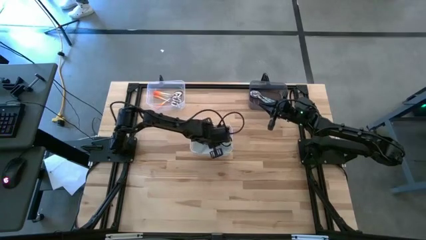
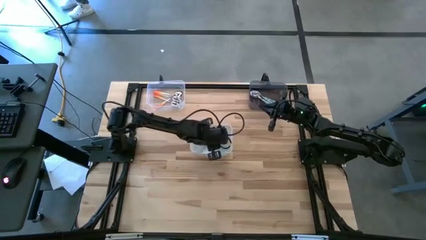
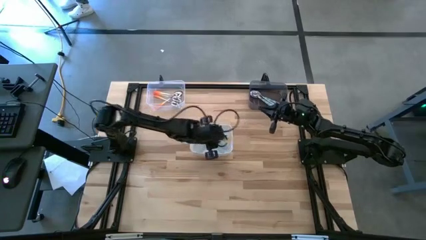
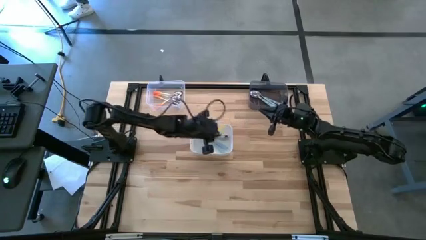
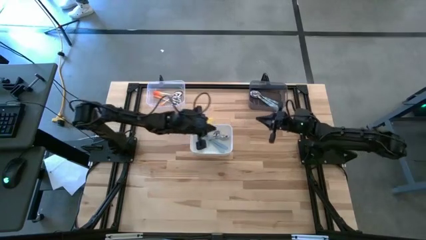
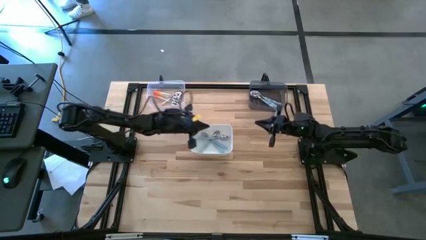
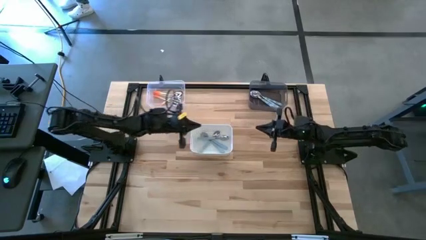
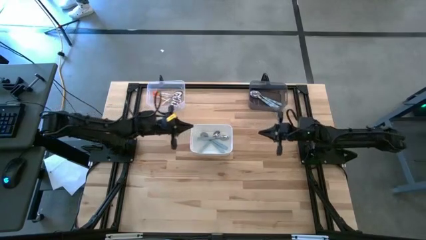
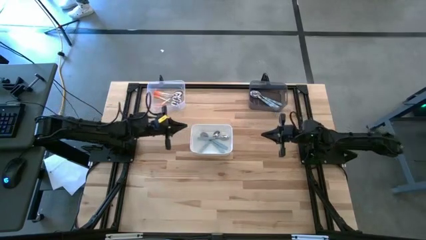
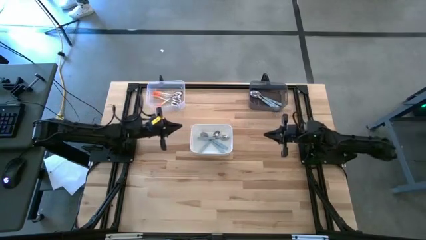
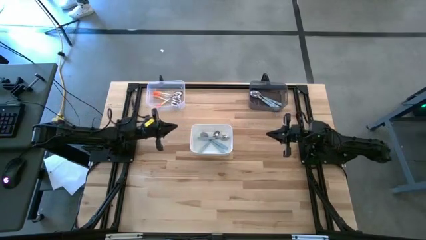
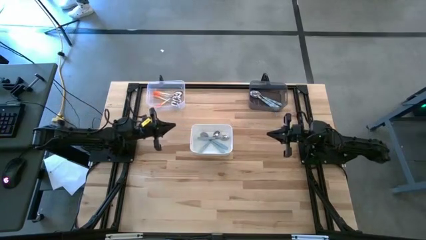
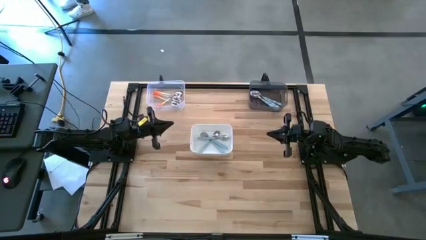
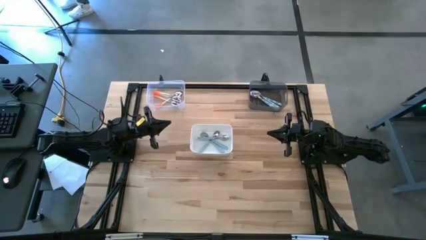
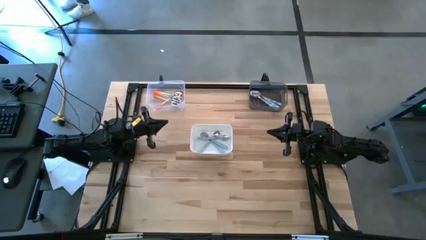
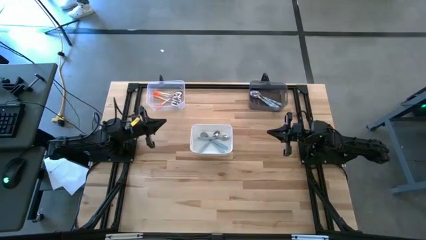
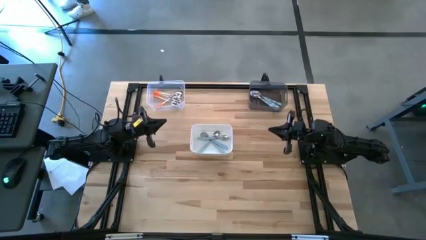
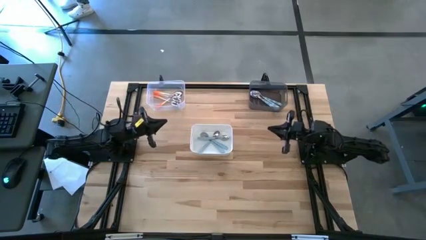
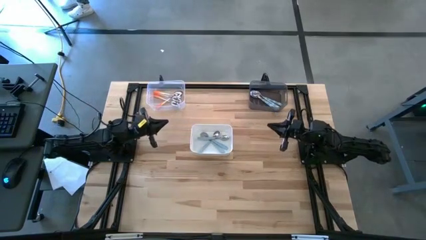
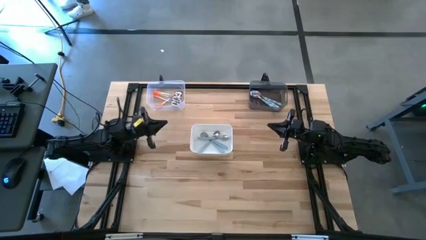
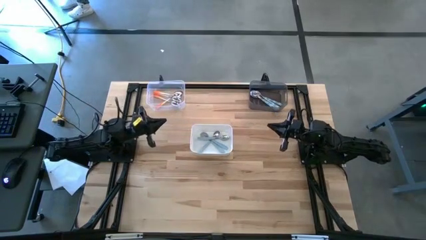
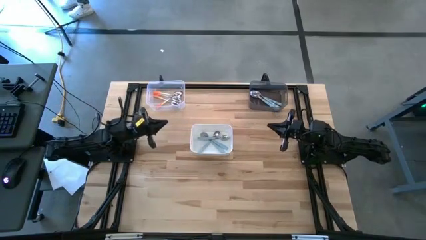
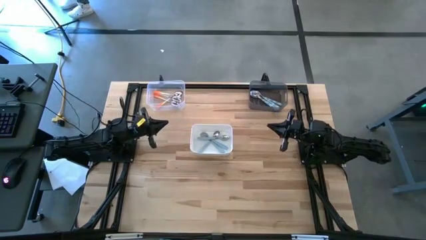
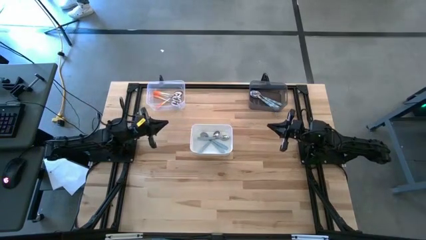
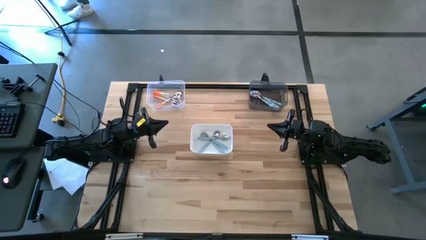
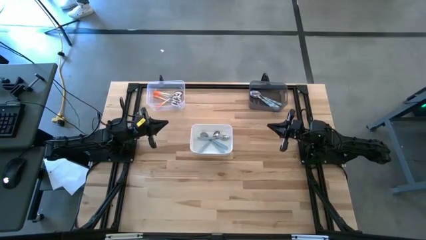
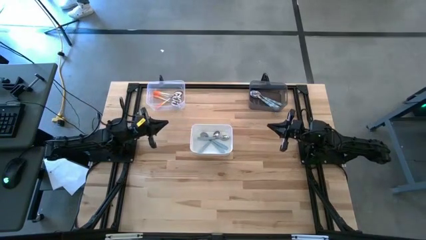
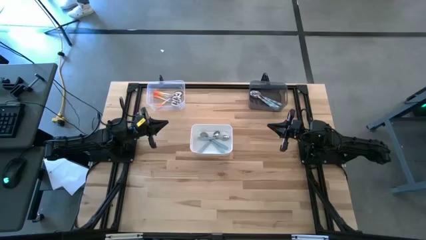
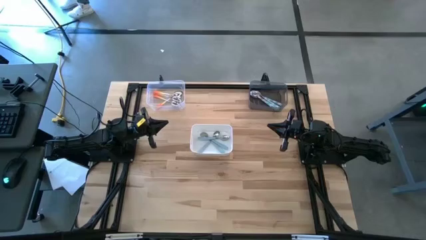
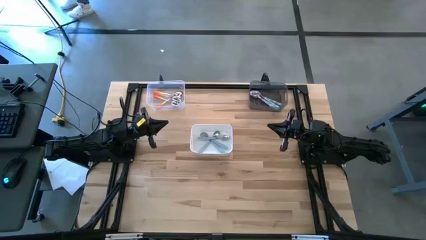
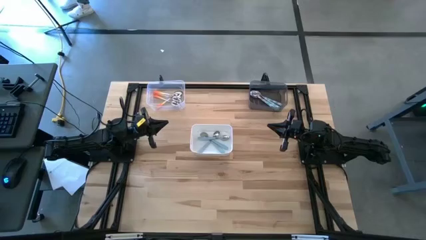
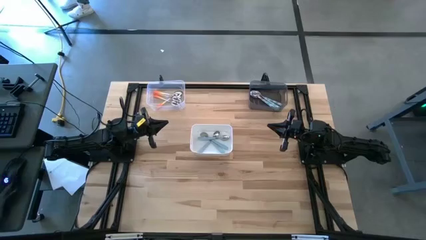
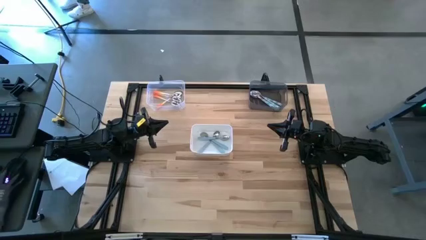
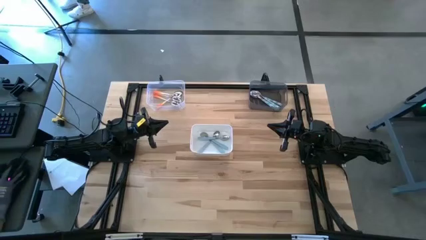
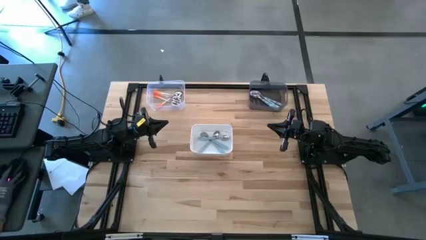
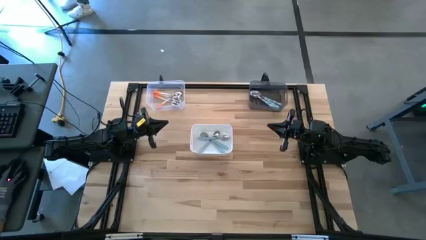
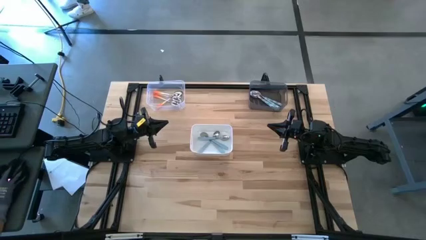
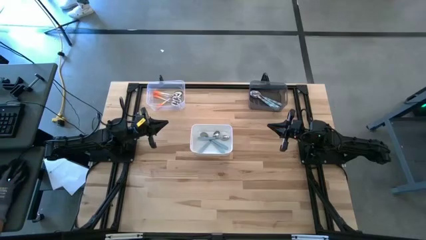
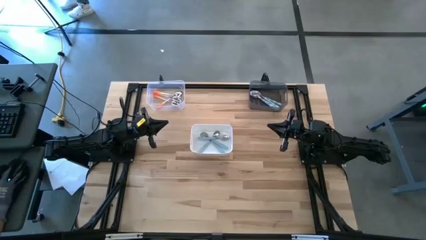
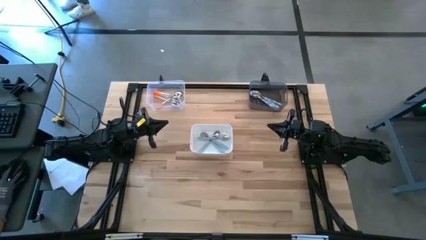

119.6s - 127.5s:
Task: Sort silverware by color (type)
Return to Home Position

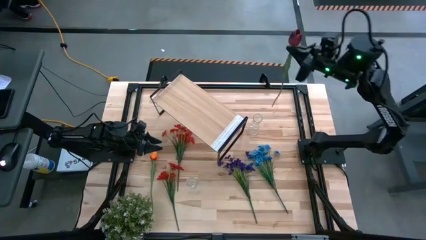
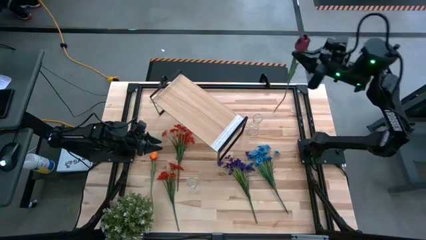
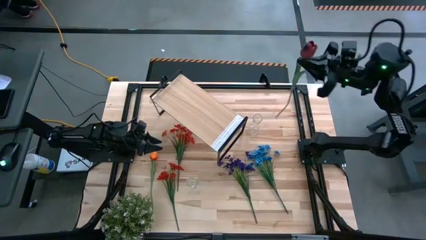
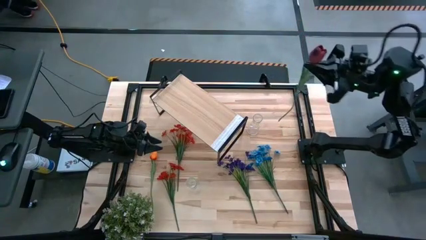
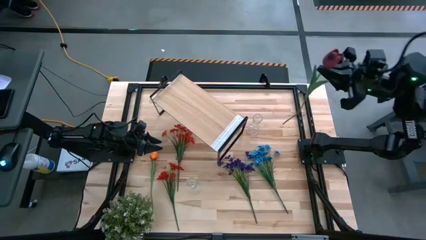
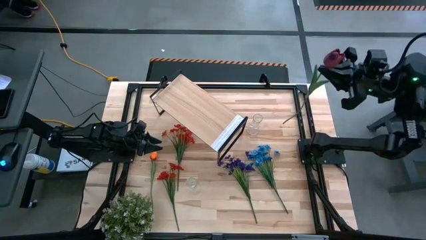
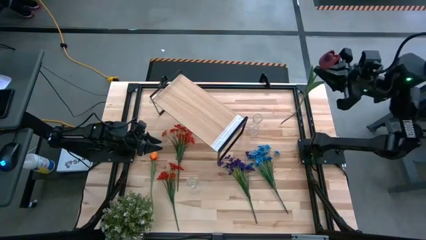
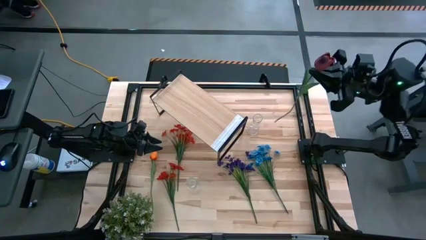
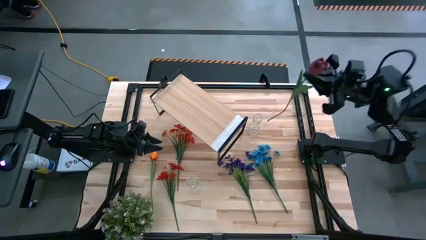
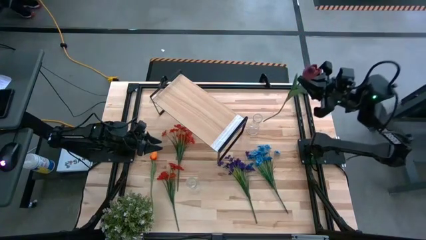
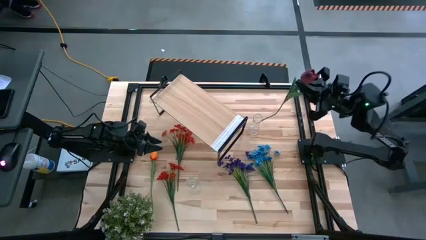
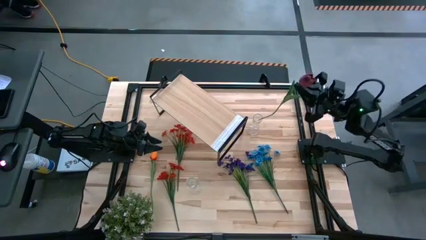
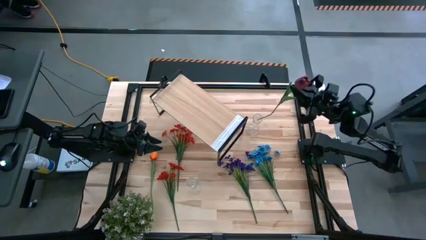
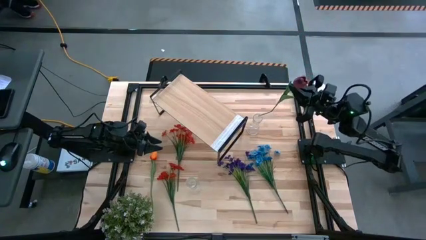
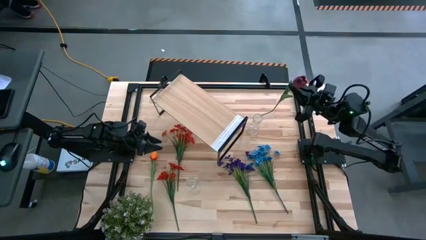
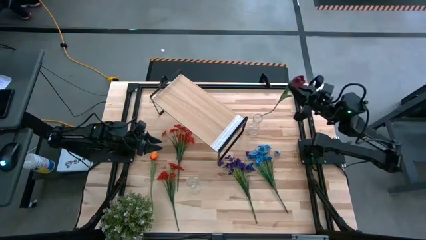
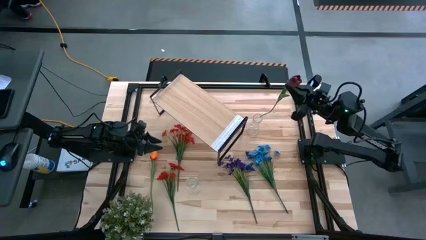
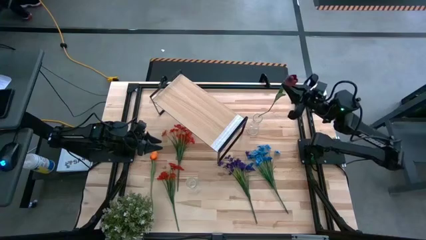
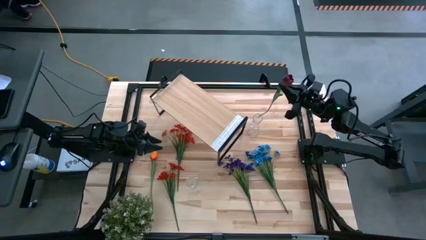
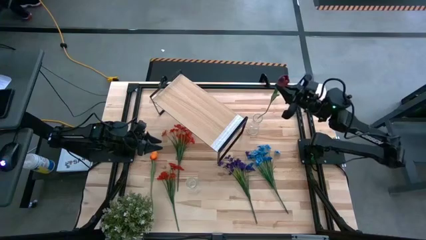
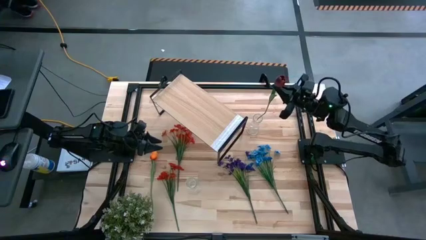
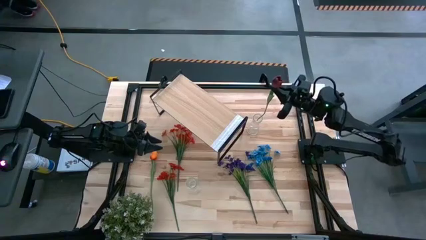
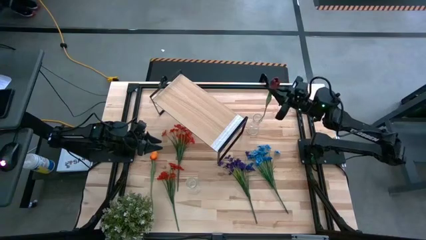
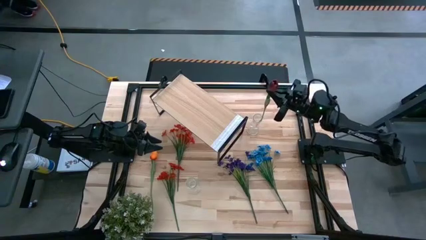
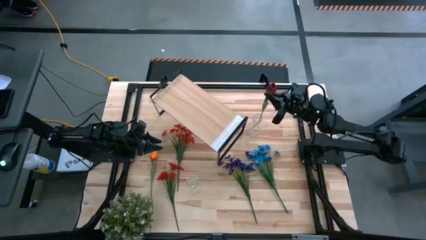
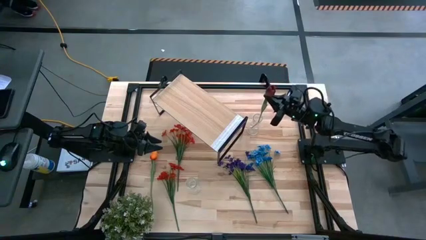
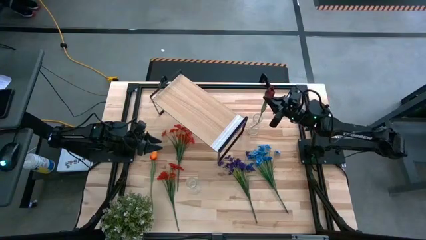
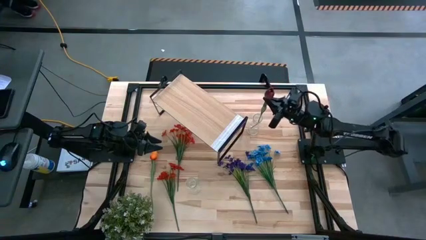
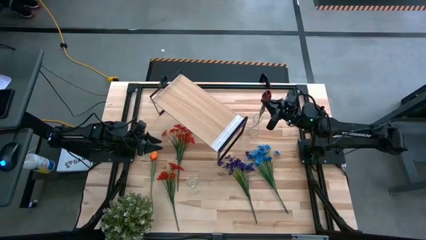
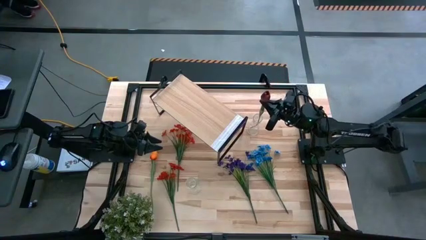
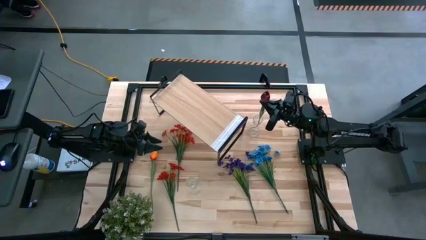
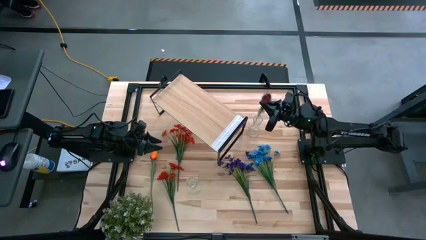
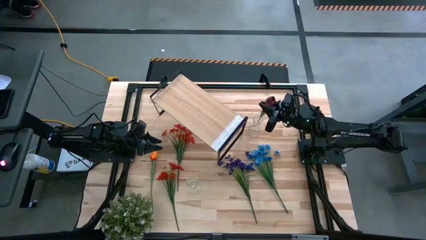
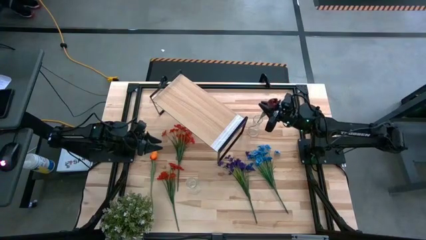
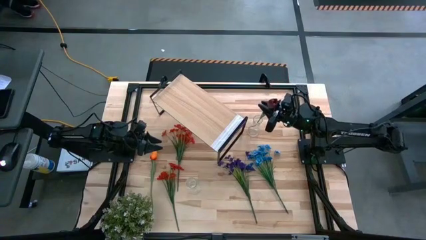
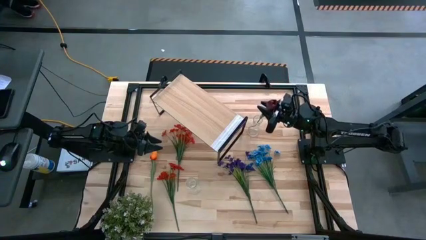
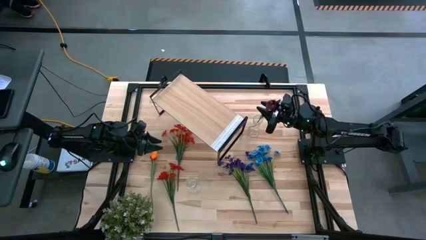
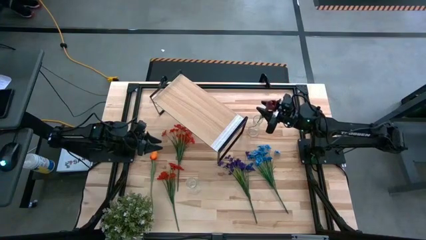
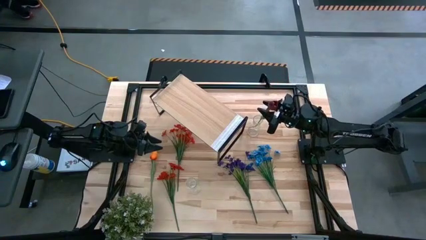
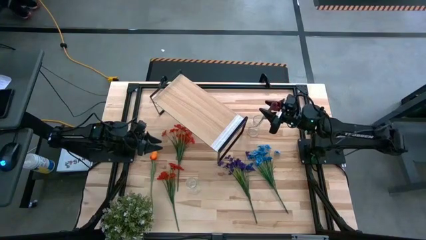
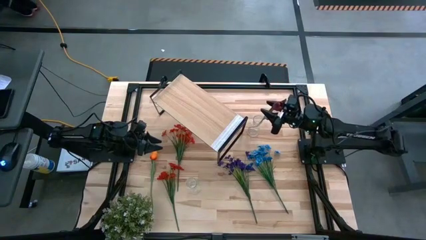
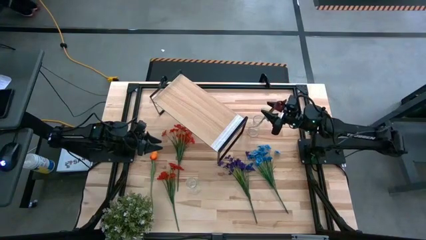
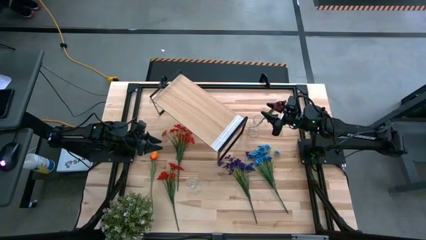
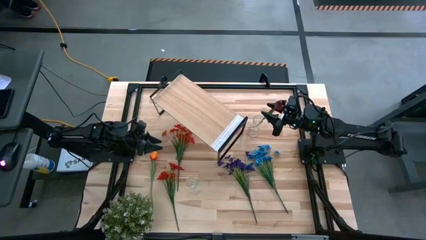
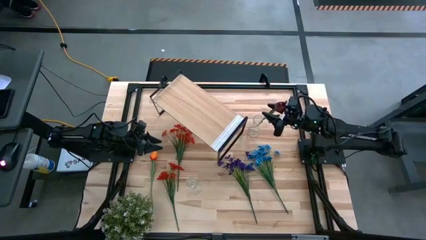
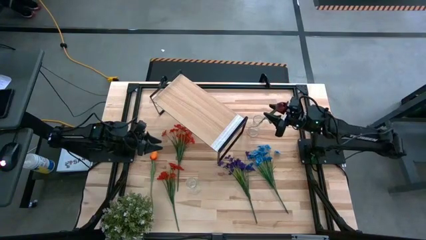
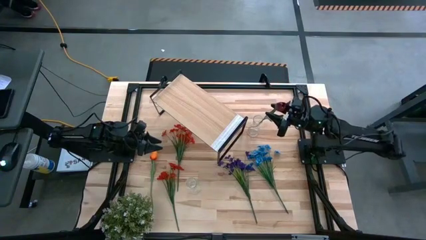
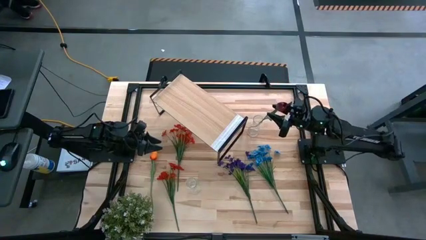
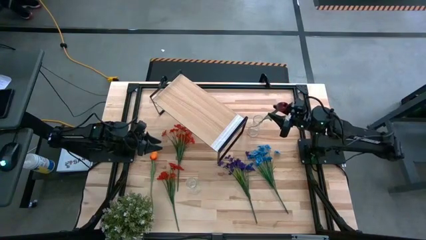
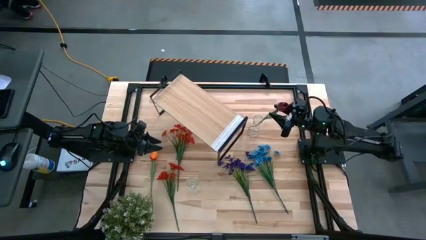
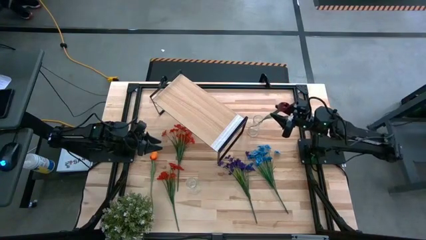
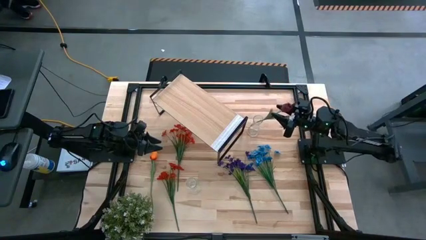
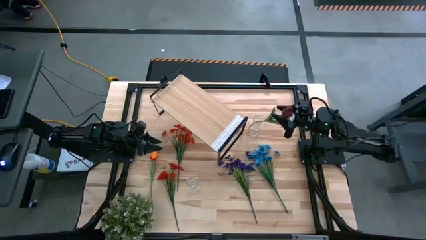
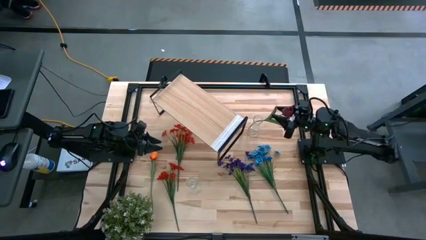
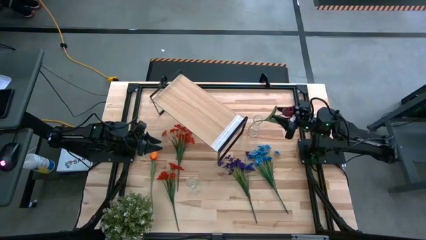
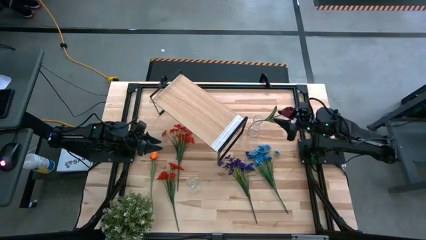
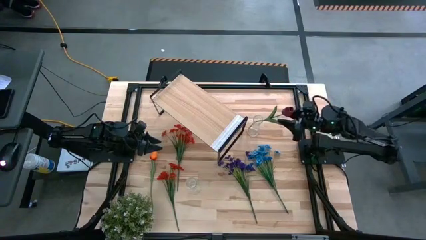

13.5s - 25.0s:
Task: Pick and place flowers into a vace then onto a shelf
Put the dark red flower into the top transparent vase
